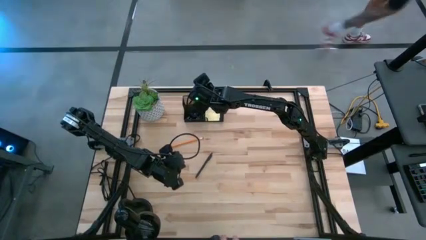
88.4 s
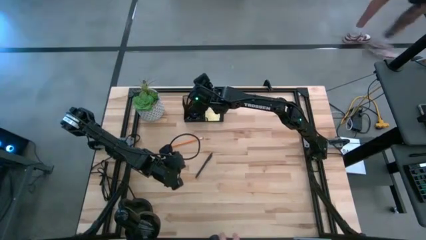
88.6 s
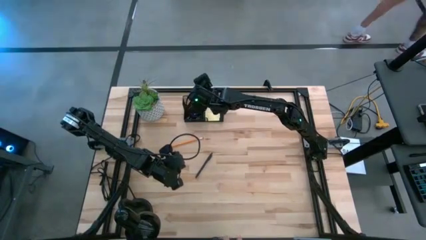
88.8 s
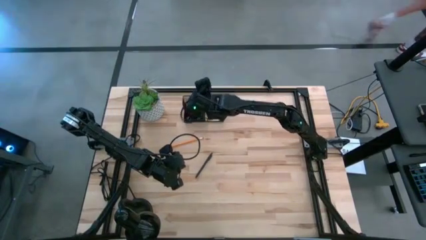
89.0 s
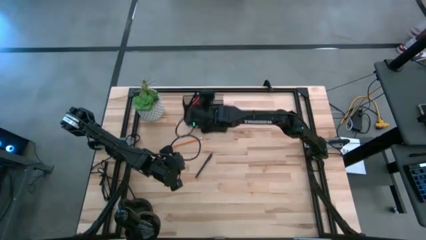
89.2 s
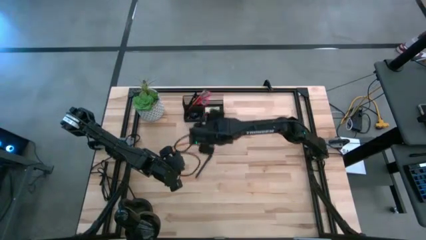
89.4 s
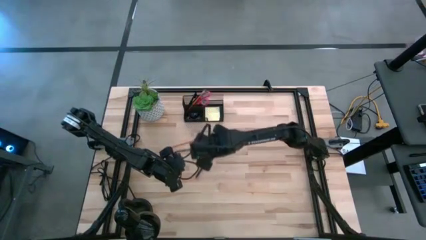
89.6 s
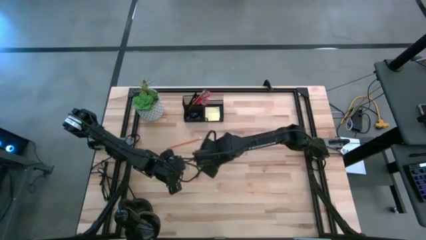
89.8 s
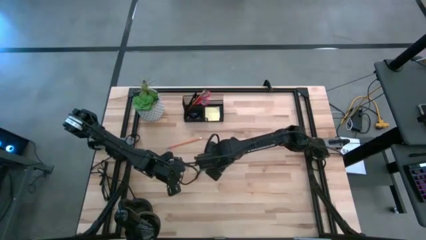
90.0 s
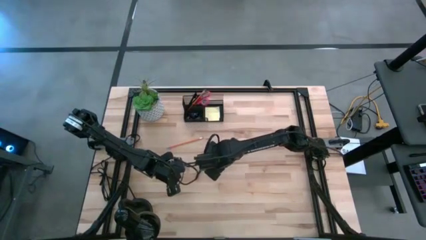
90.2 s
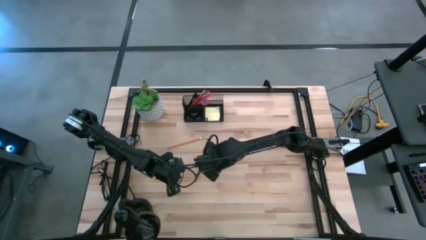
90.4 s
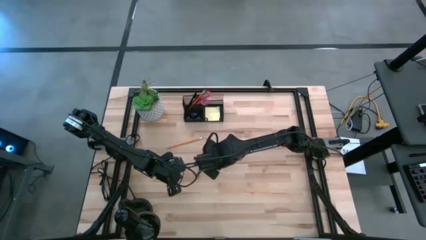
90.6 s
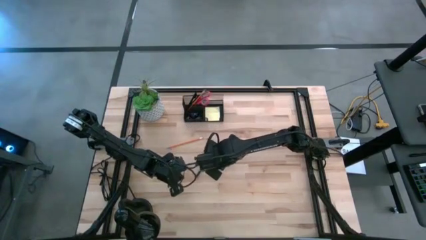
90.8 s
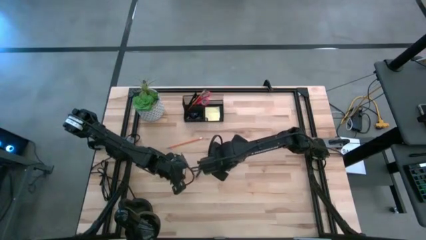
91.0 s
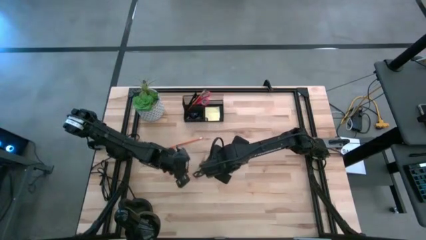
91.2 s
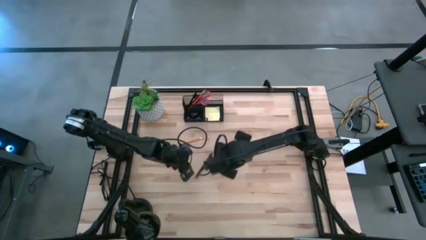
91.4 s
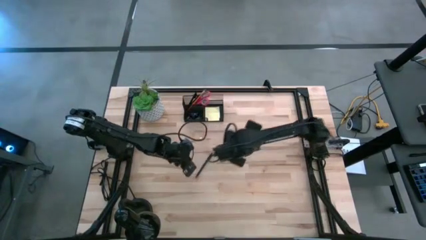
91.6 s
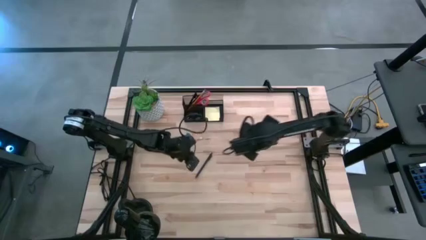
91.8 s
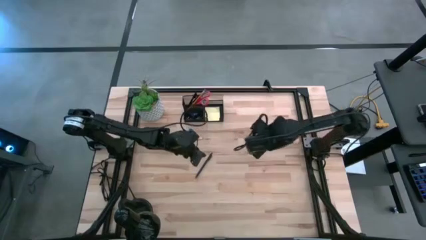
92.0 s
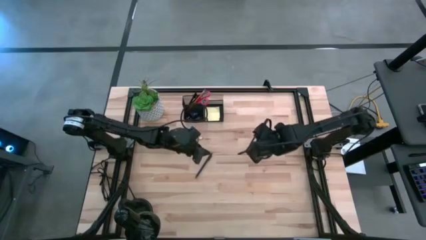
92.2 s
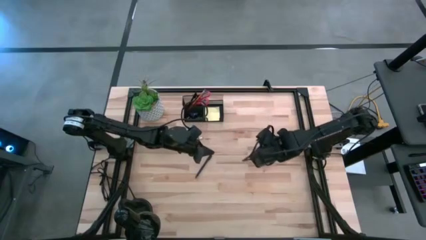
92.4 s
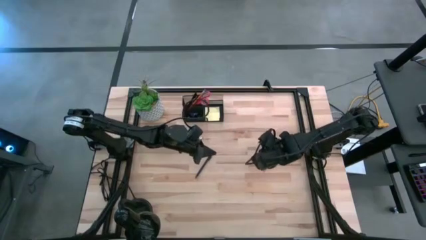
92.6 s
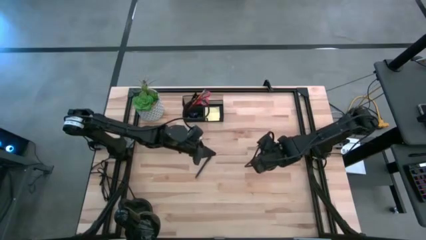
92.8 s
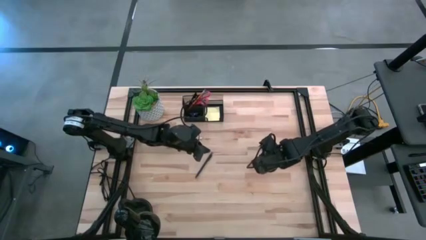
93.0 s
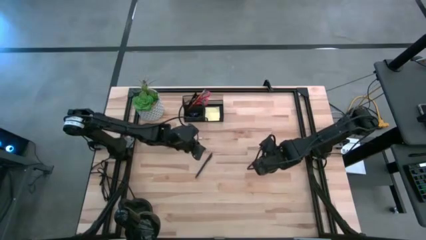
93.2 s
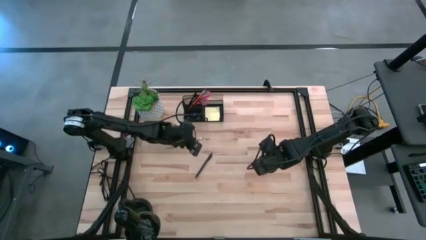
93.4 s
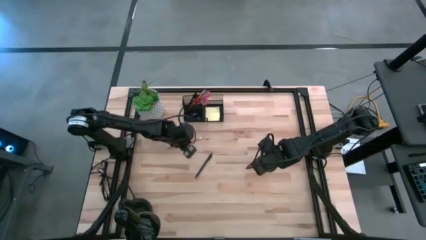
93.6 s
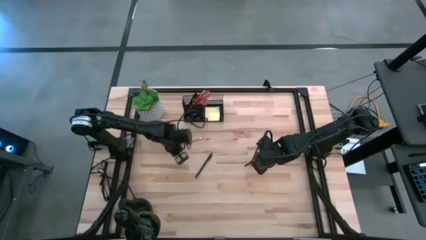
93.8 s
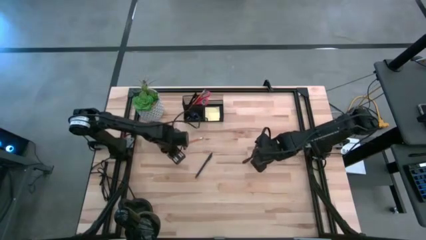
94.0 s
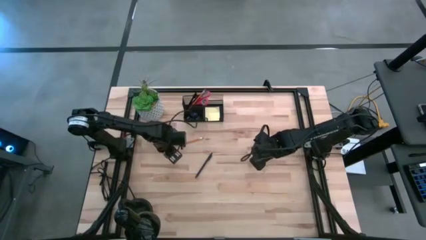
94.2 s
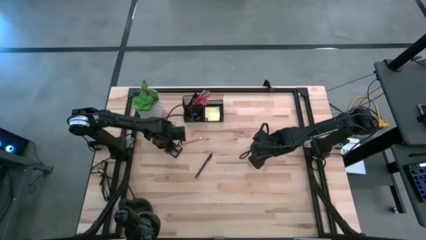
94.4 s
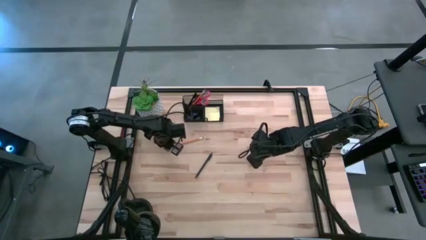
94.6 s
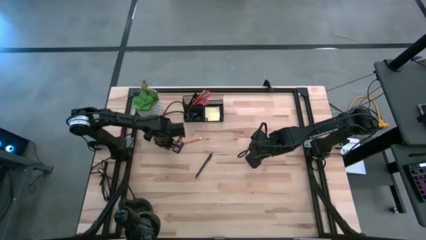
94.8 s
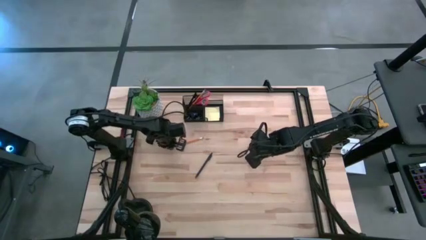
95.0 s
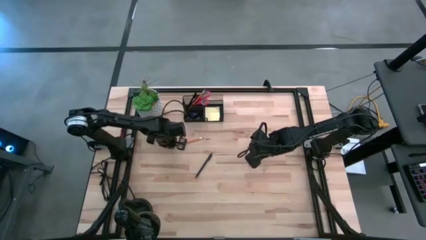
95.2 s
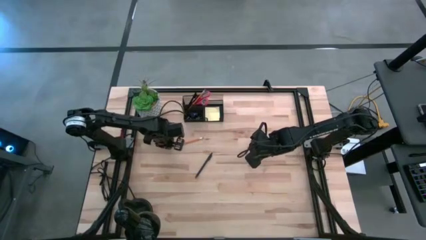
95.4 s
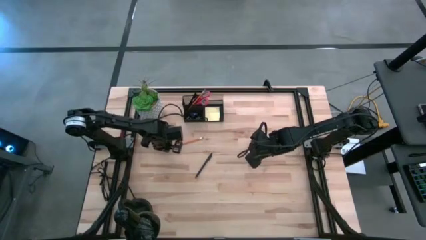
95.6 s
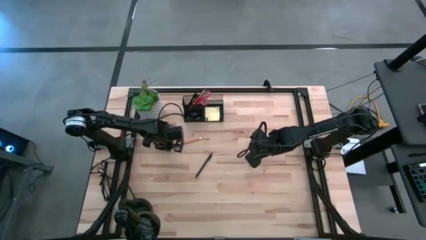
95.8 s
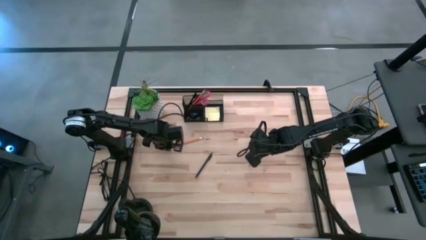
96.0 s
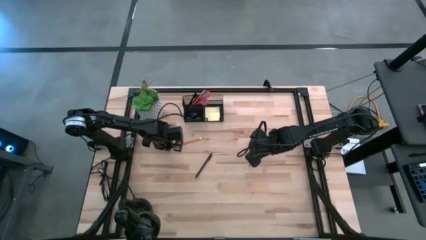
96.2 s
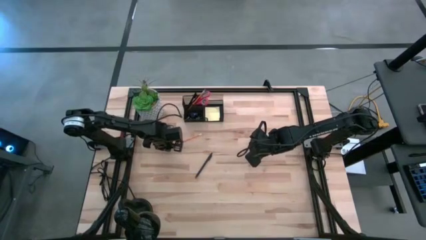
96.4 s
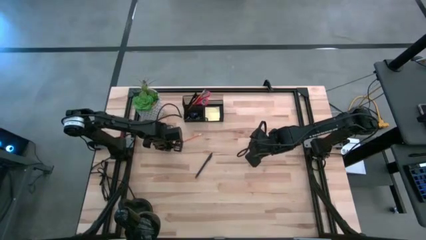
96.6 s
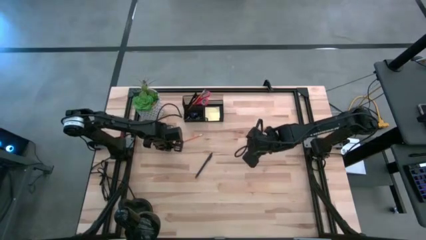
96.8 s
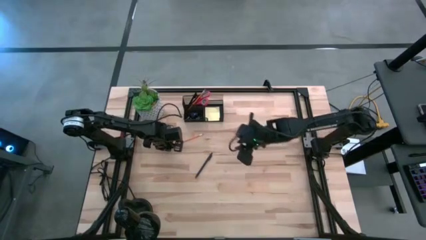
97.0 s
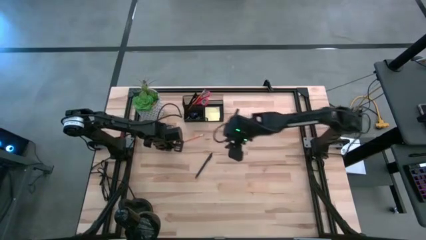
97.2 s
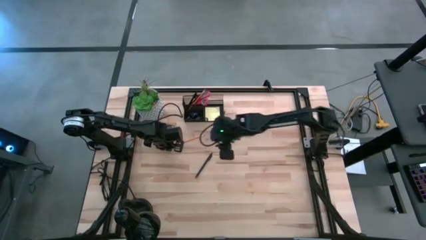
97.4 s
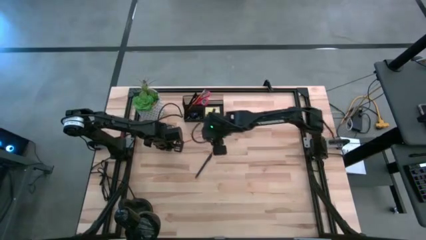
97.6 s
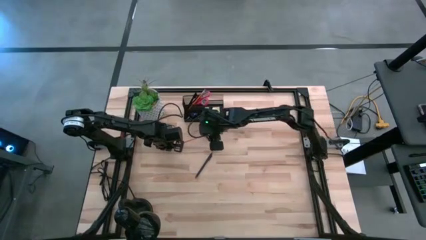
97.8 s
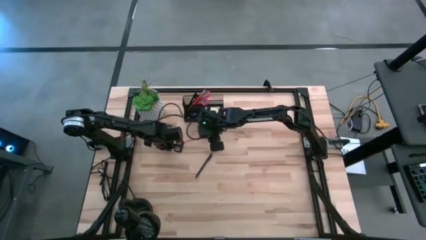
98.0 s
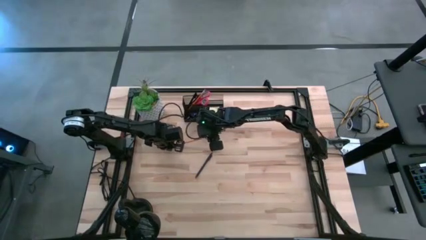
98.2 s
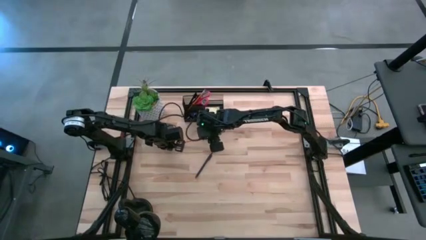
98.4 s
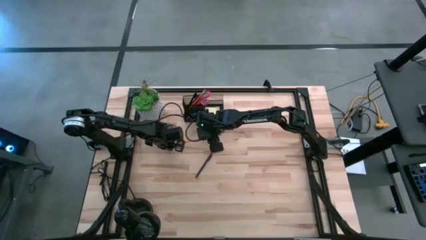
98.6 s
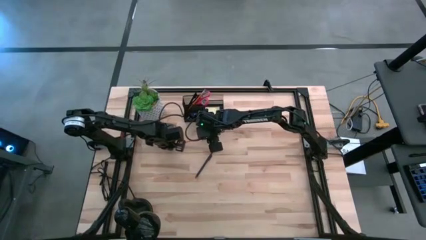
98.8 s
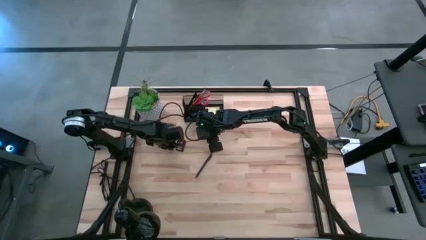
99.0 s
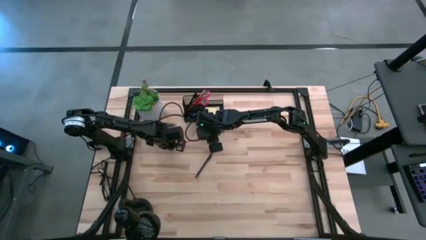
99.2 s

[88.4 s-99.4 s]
Task: Pick and place office supplies into organizer
Put the pencil into the top left section of the black desk organizer

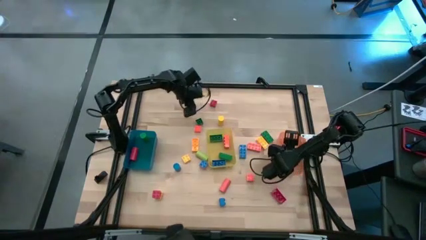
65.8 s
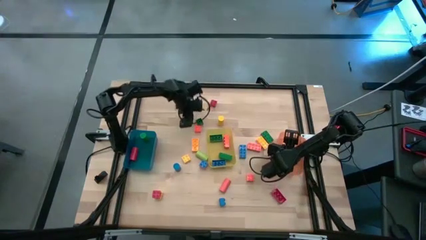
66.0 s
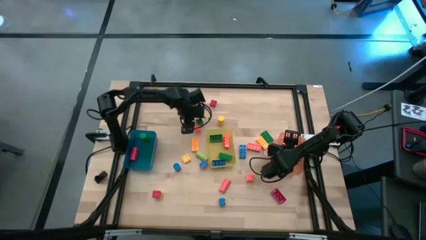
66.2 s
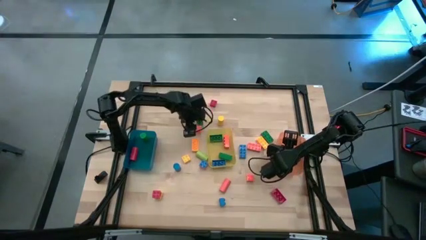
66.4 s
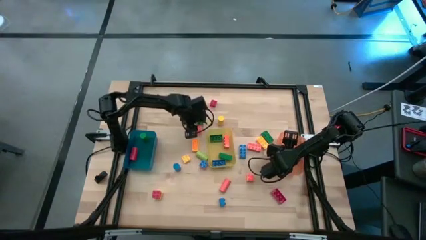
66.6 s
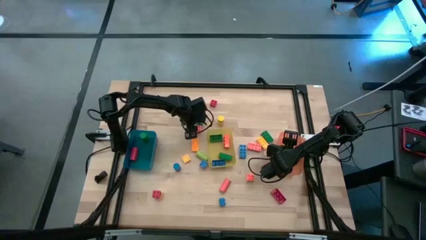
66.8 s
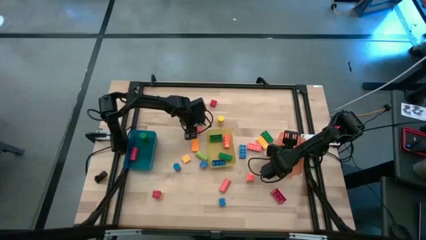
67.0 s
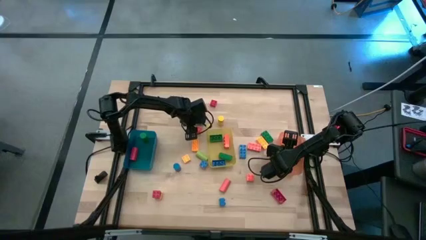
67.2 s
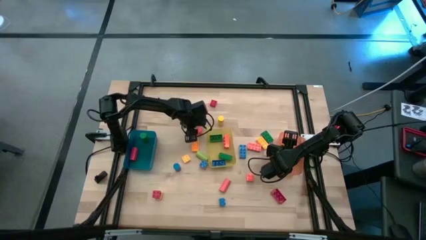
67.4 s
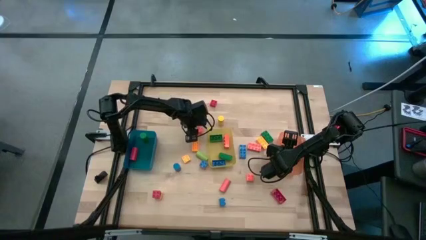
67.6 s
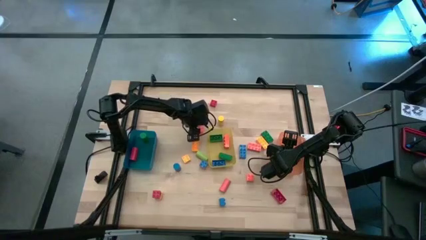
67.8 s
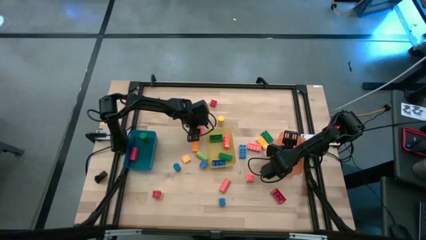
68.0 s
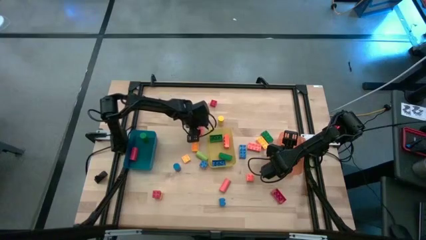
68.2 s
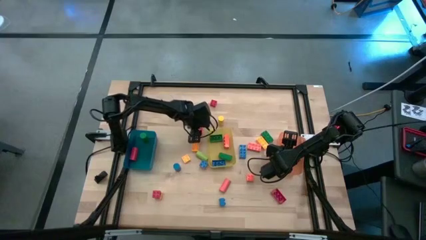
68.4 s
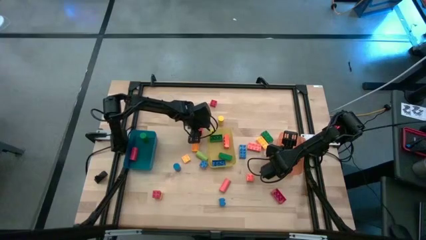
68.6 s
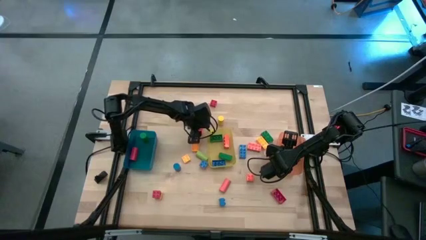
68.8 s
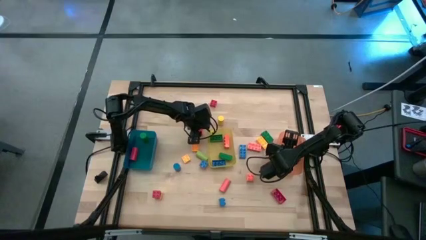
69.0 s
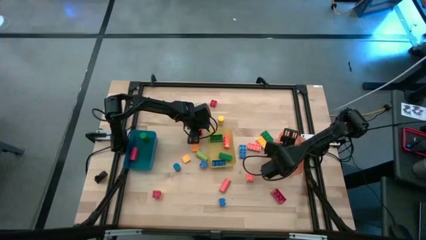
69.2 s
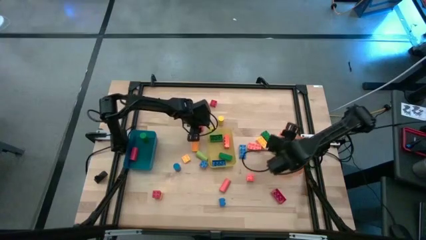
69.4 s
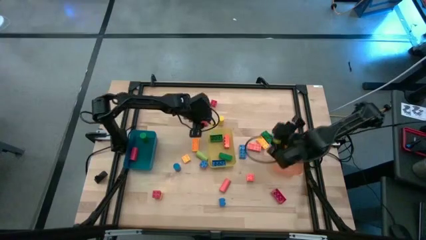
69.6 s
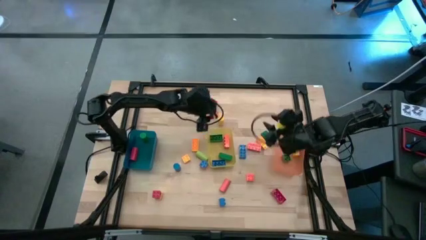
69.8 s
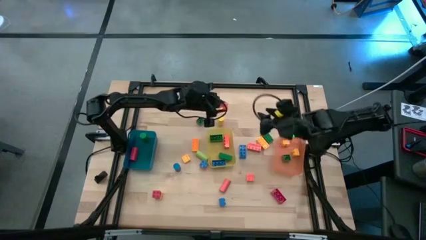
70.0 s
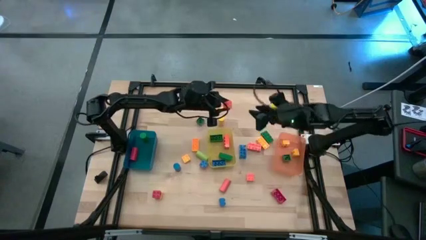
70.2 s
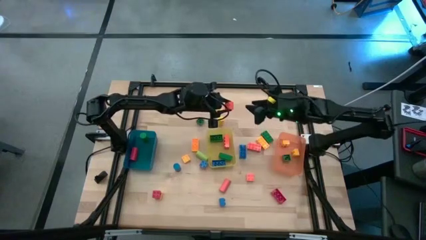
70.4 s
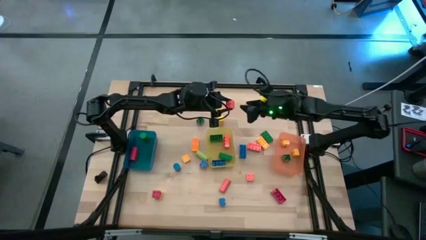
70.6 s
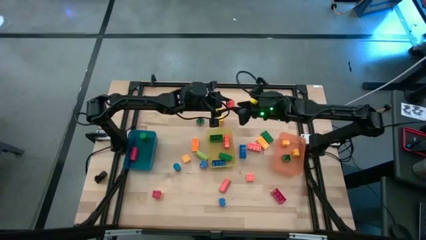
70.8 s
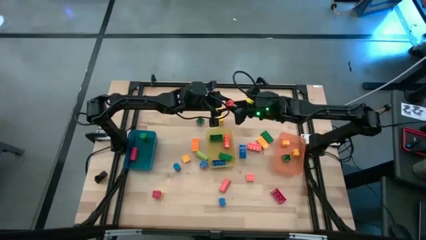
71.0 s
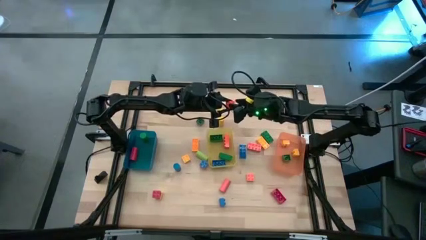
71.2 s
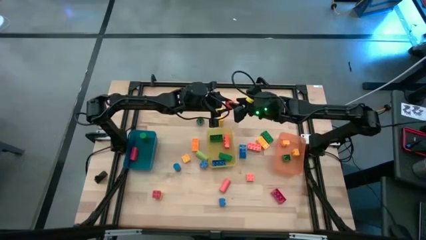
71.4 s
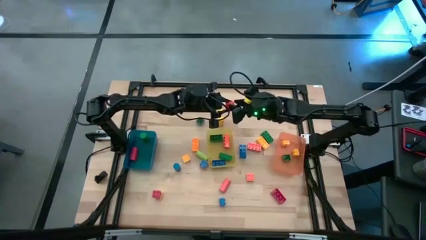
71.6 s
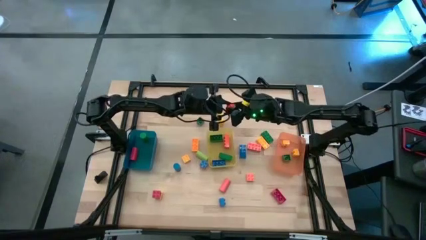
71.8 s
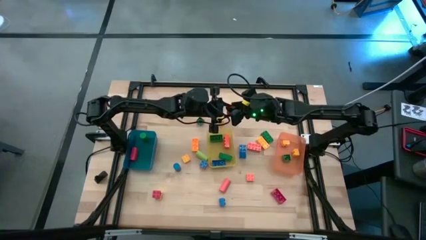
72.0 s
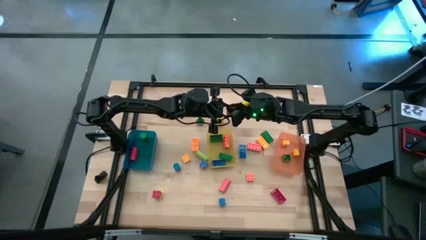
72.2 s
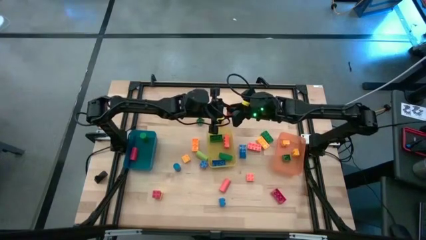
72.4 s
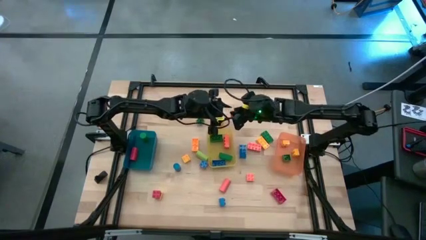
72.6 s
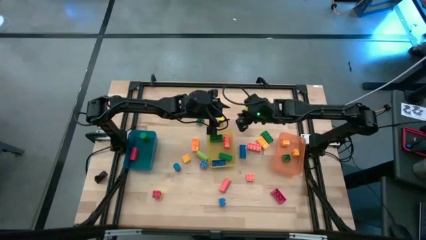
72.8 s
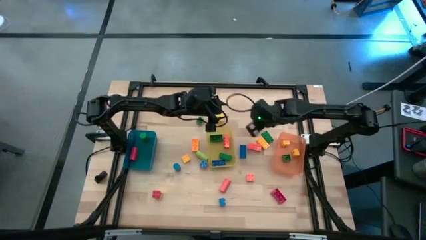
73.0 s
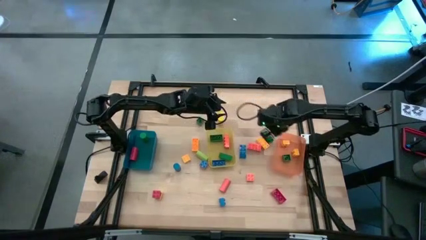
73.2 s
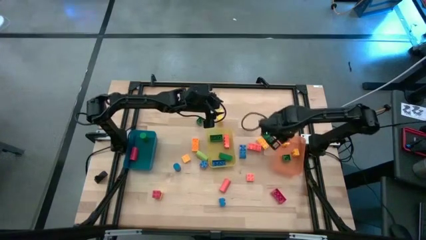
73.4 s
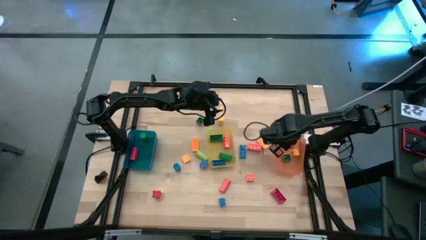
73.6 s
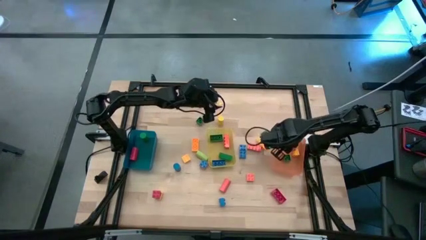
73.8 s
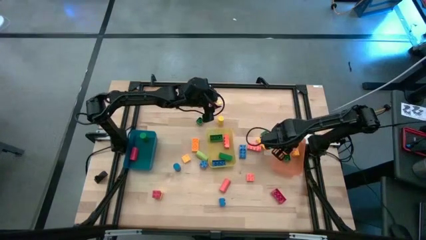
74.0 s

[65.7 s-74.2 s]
Task: Sort blocks by size
Put the orange 4 stud game piece into the orange bin
